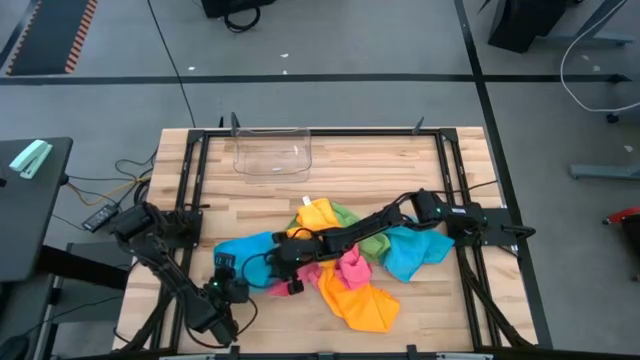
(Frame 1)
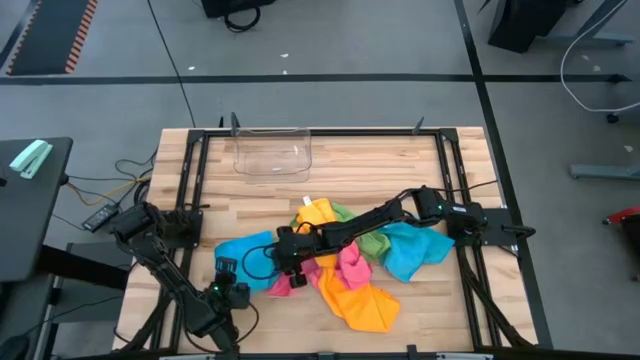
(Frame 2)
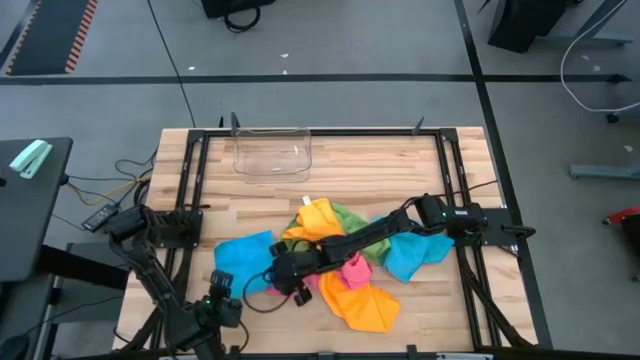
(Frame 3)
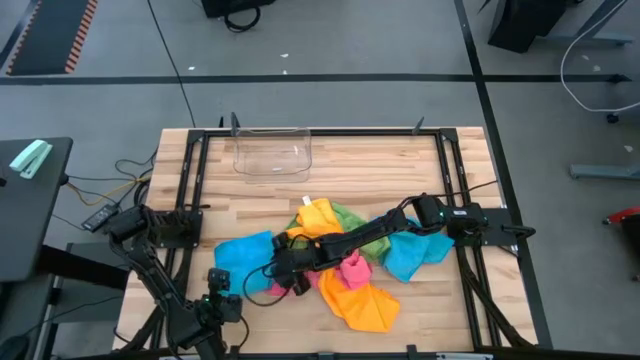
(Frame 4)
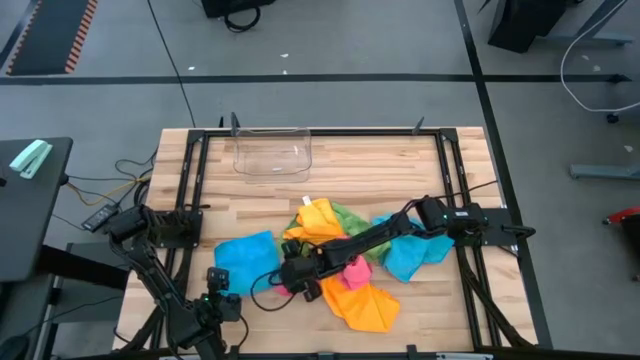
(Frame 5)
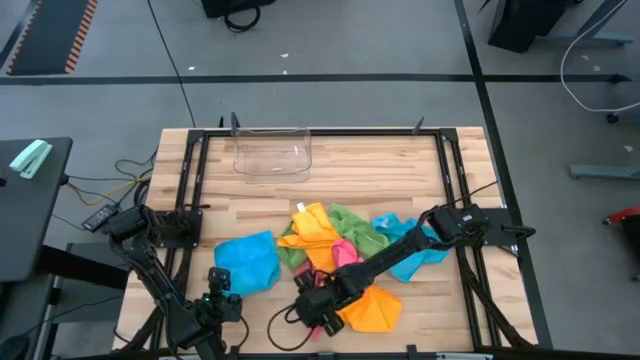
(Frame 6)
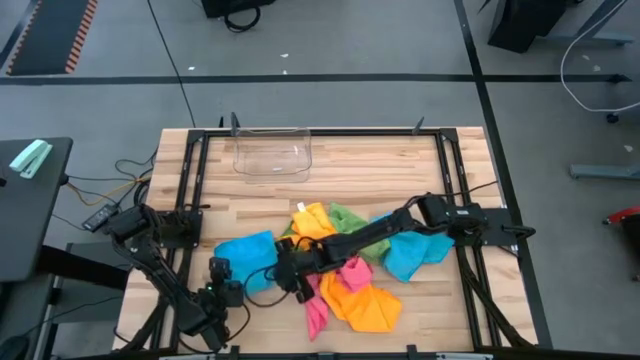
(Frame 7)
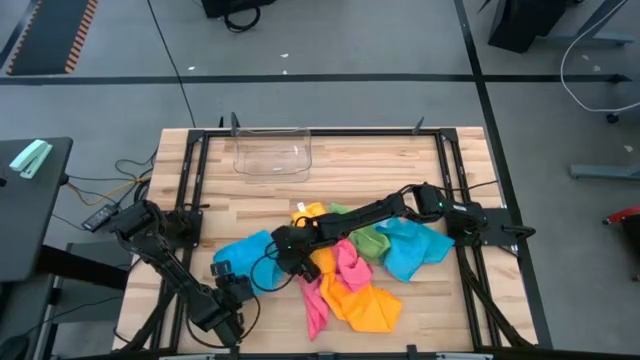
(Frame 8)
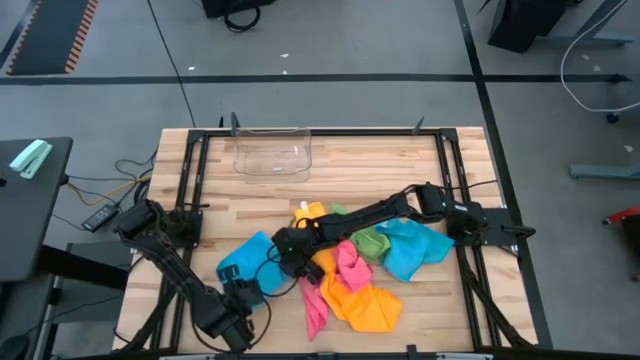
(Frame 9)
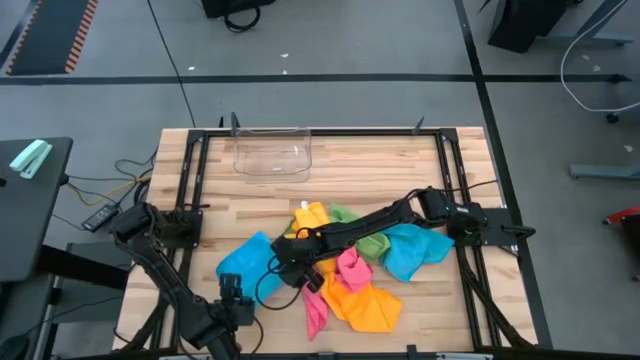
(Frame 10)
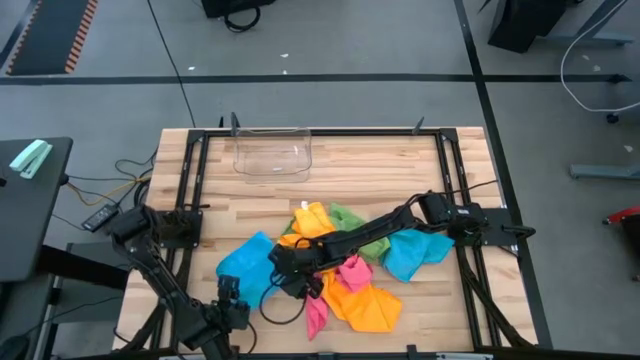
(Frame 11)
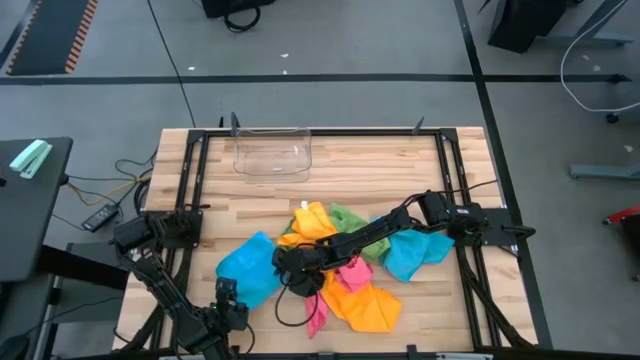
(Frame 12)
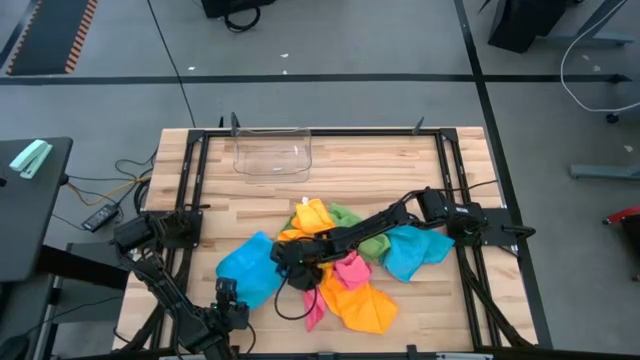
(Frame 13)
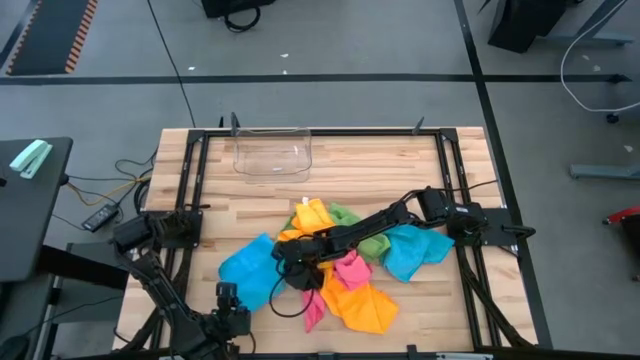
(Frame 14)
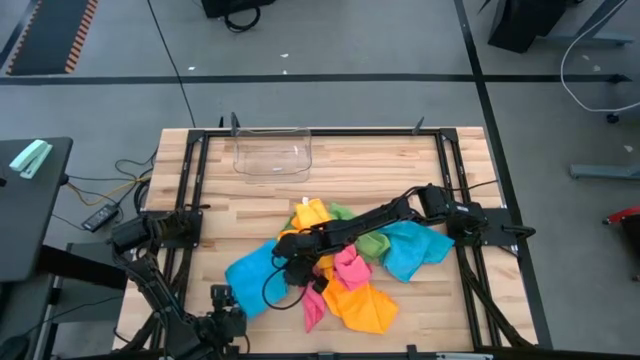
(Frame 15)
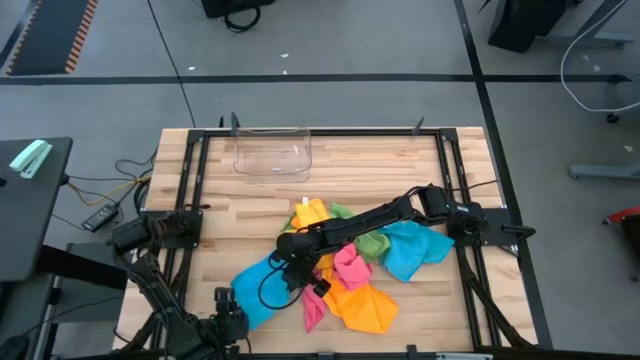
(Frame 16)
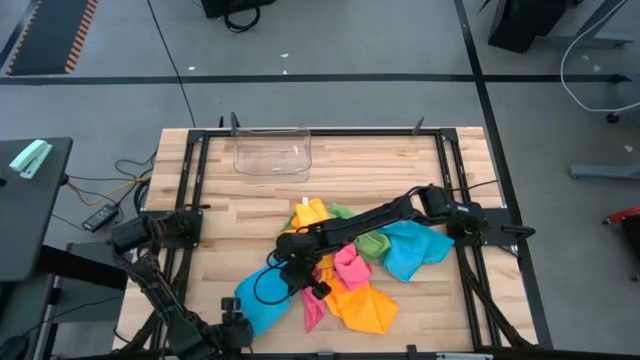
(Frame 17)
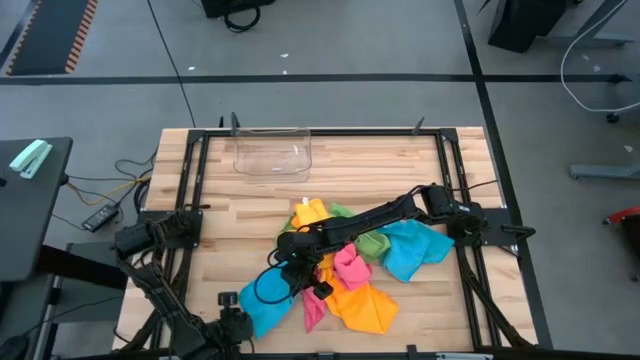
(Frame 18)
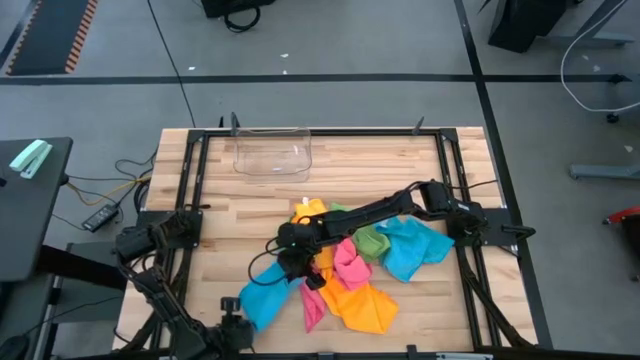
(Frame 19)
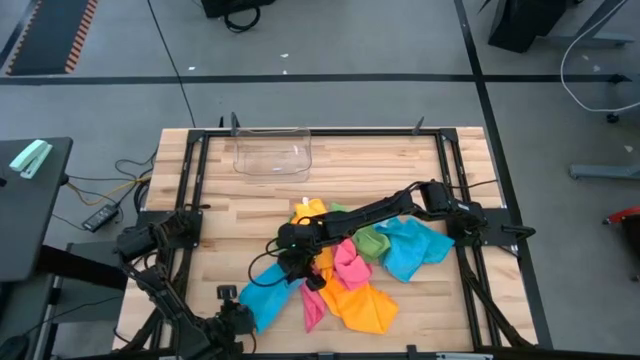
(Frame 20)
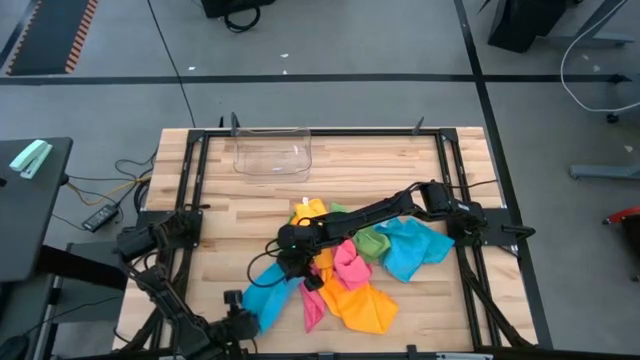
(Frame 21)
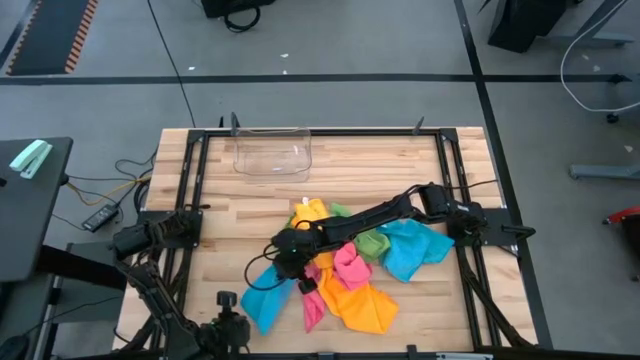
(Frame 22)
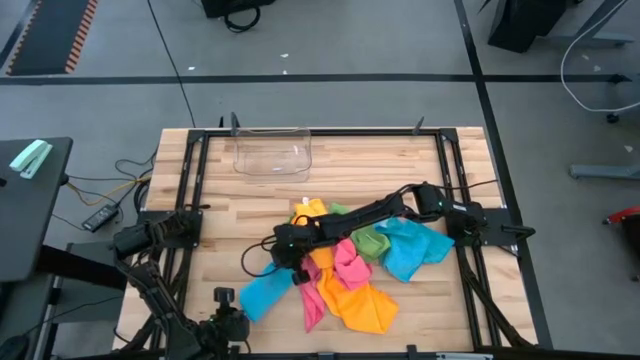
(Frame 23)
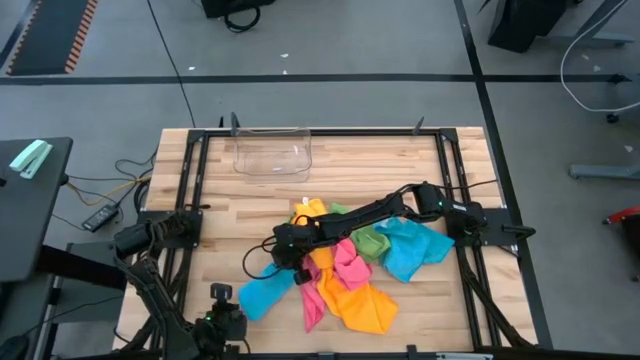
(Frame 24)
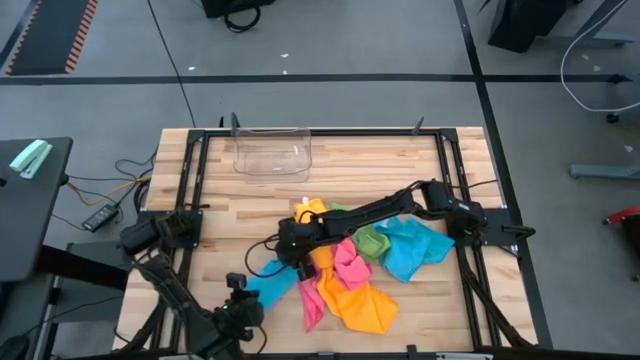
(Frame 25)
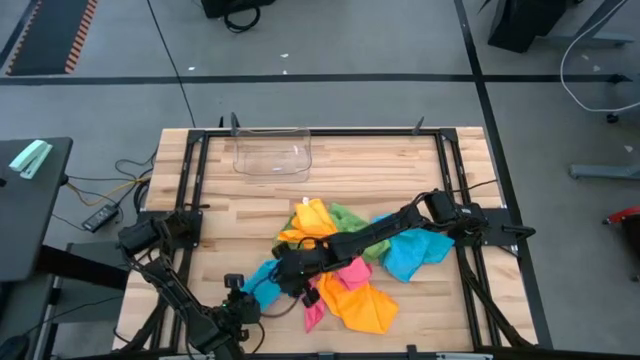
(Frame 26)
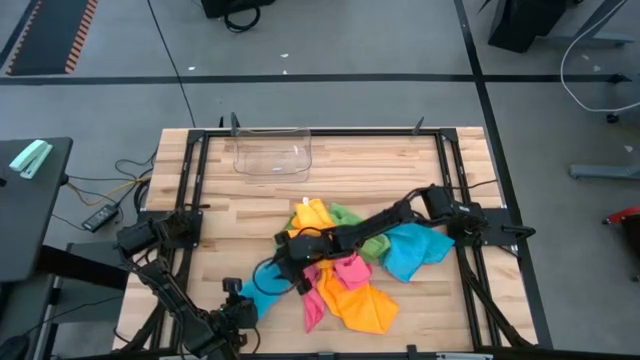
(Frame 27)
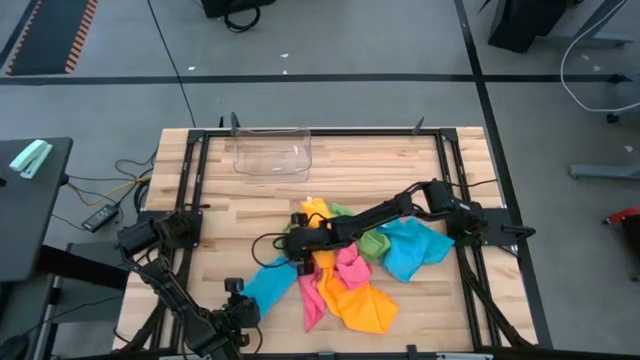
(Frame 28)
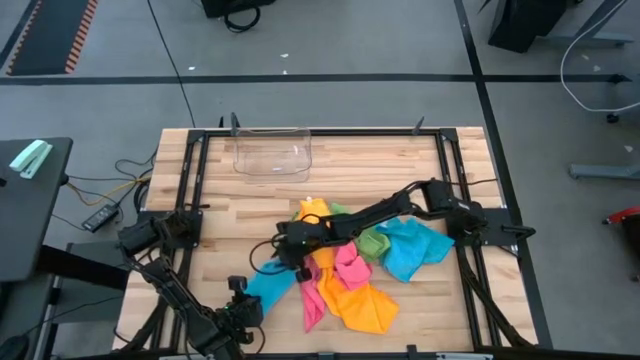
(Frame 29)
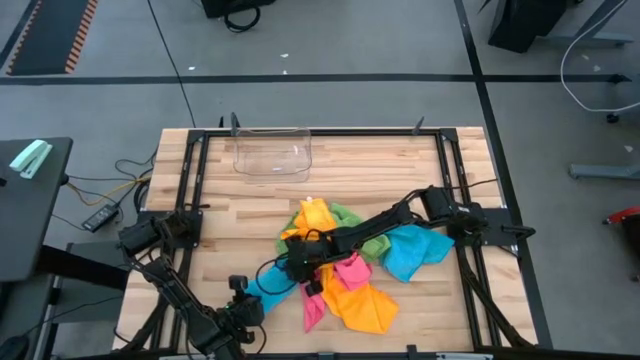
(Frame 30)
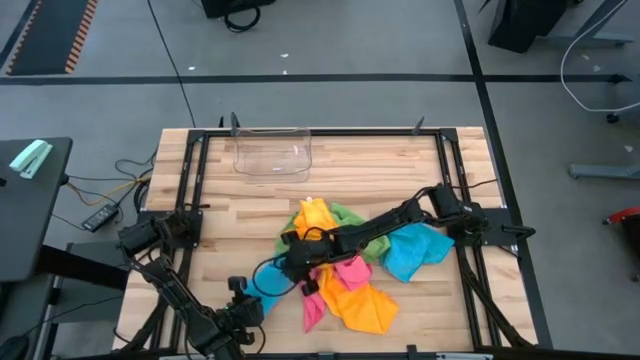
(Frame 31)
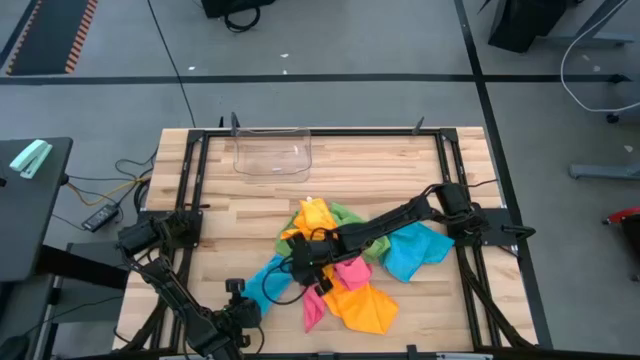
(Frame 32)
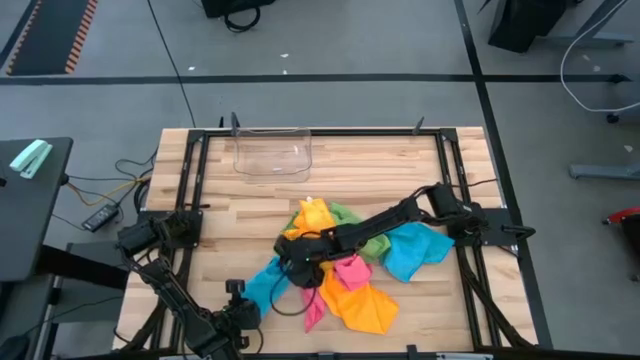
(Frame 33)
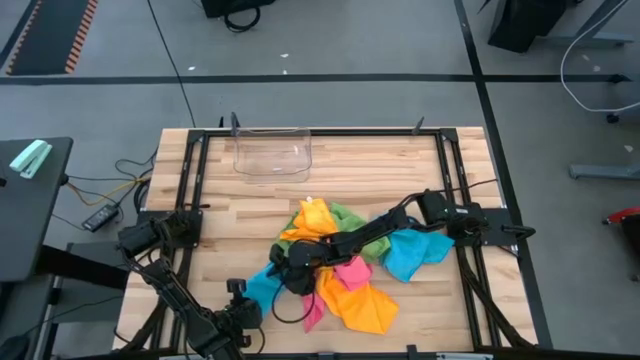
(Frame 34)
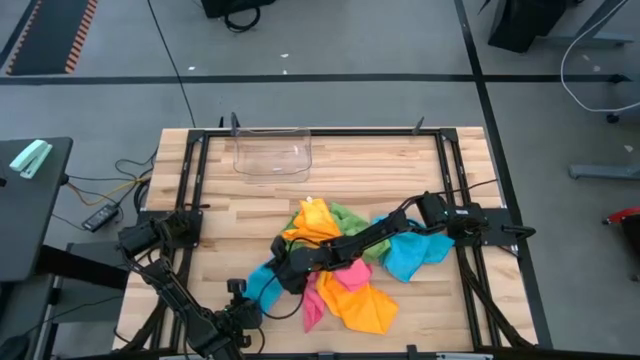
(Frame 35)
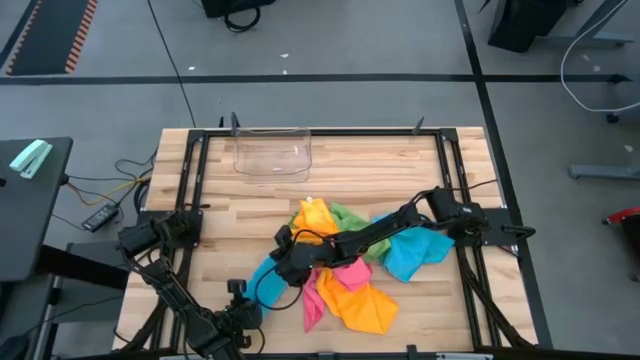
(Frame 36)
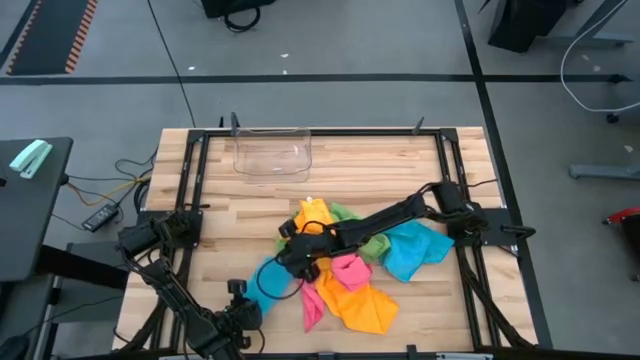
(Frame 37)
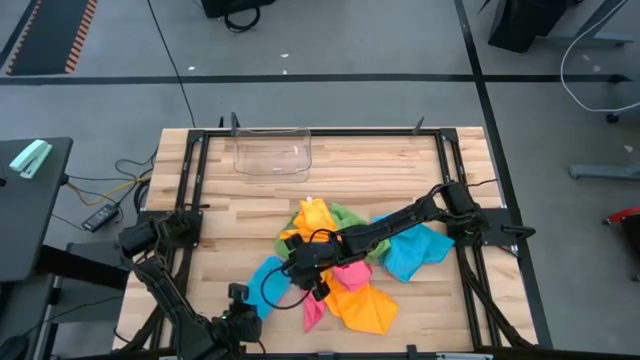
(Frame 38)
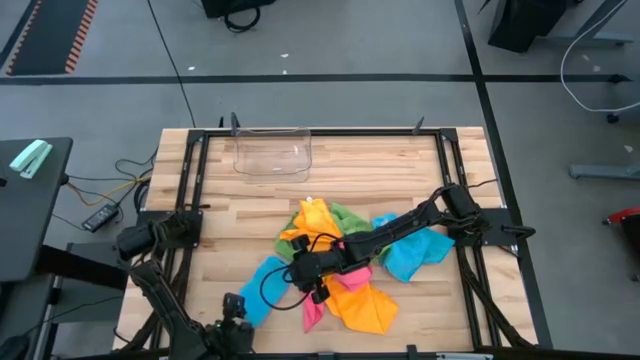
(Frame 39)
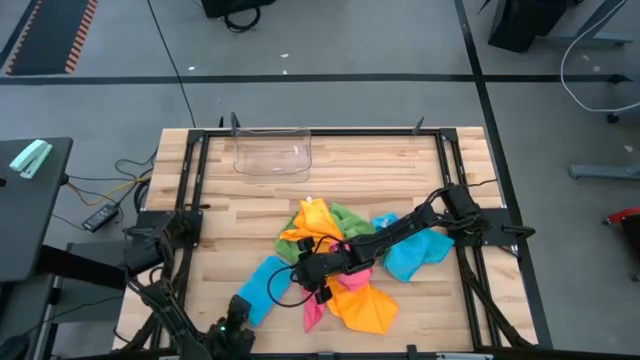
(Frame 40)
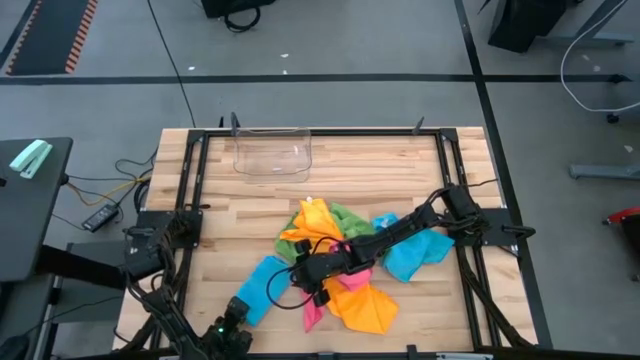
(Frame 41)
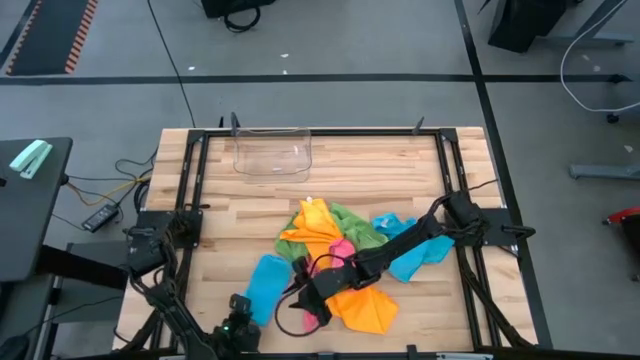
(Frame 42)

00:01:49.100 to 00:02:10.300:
Task: Fold microfiber towels
Fold the left blue microfiber towel
